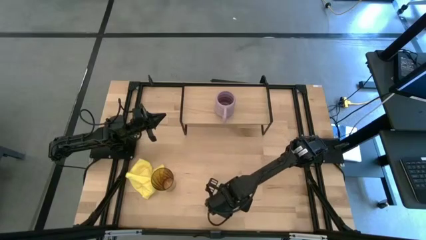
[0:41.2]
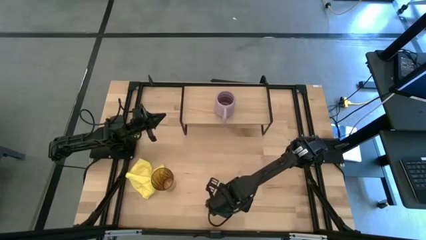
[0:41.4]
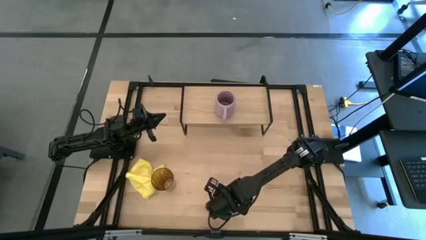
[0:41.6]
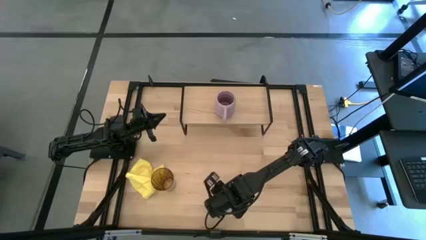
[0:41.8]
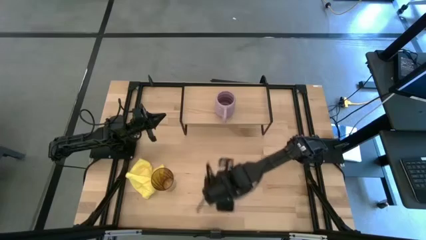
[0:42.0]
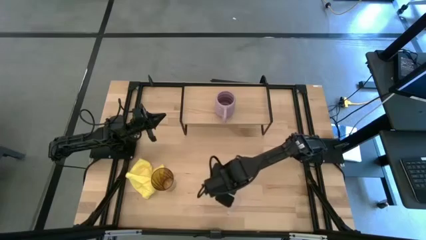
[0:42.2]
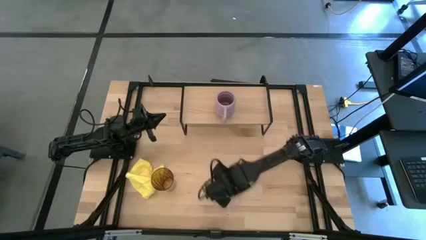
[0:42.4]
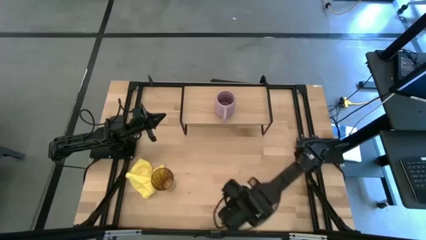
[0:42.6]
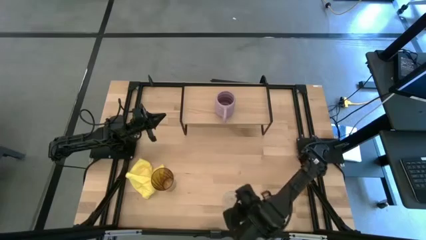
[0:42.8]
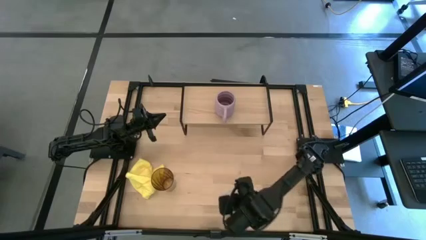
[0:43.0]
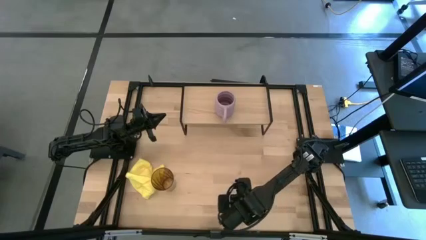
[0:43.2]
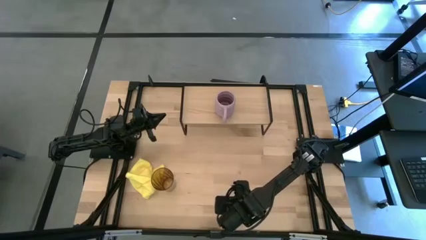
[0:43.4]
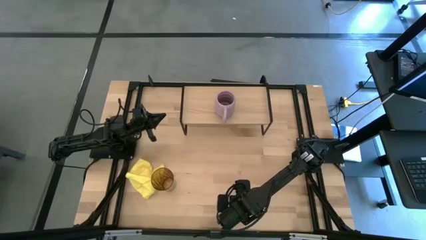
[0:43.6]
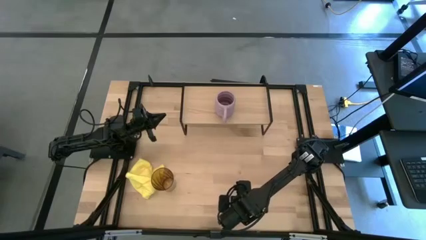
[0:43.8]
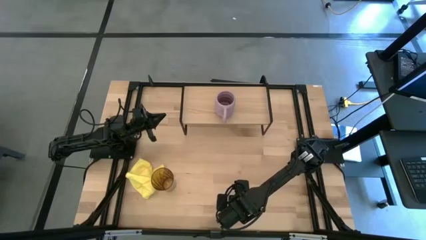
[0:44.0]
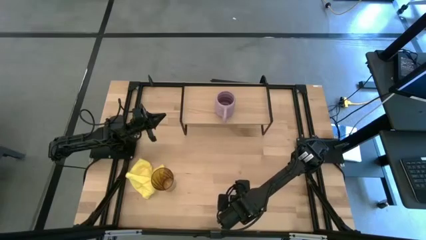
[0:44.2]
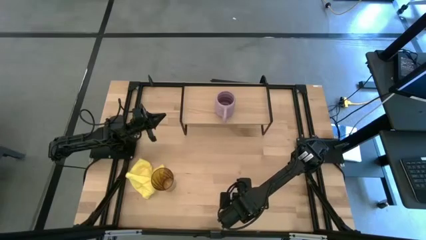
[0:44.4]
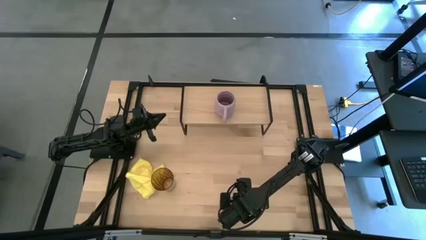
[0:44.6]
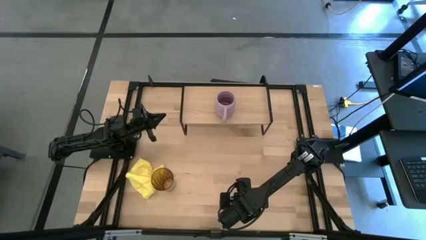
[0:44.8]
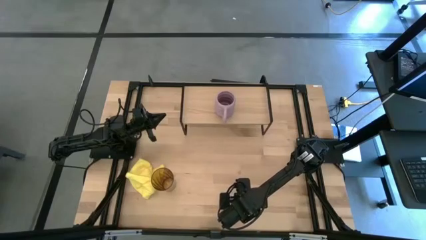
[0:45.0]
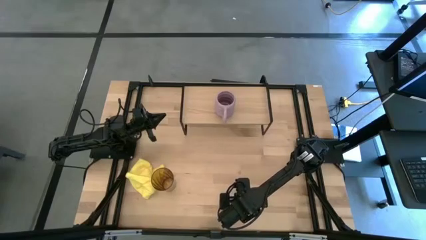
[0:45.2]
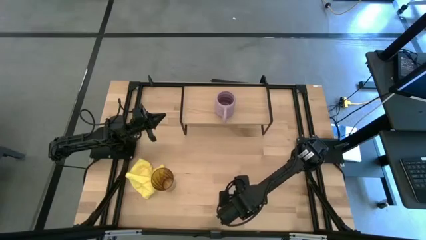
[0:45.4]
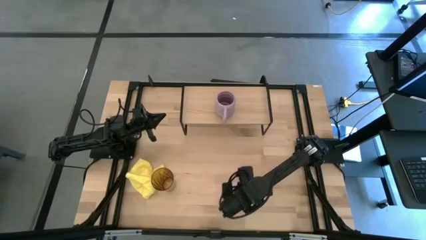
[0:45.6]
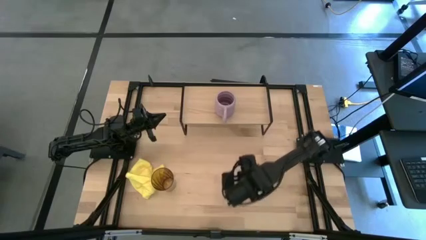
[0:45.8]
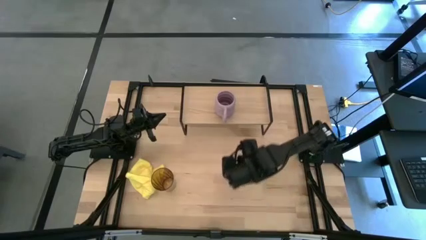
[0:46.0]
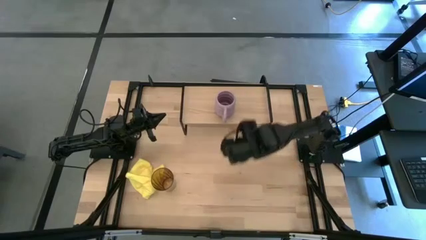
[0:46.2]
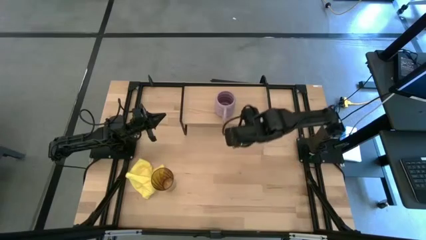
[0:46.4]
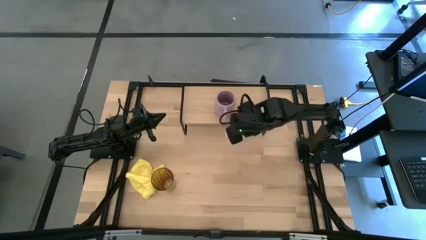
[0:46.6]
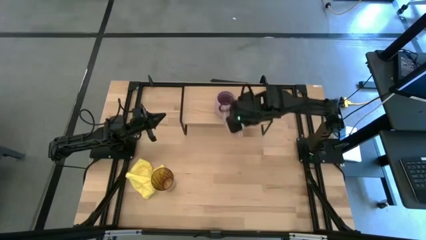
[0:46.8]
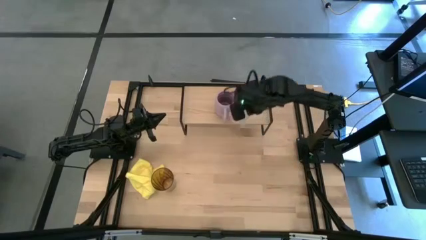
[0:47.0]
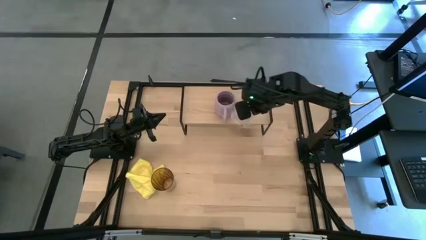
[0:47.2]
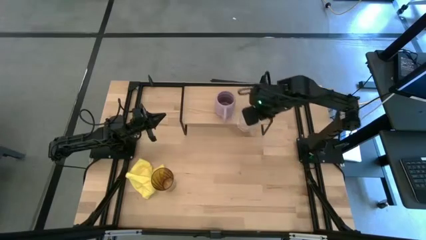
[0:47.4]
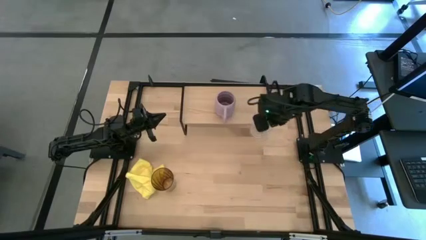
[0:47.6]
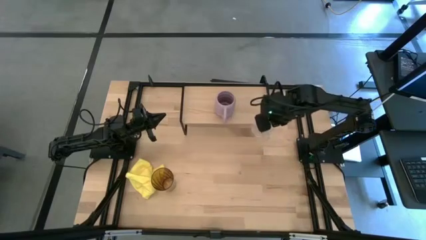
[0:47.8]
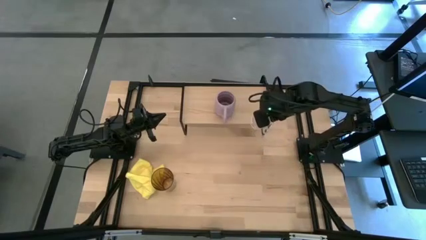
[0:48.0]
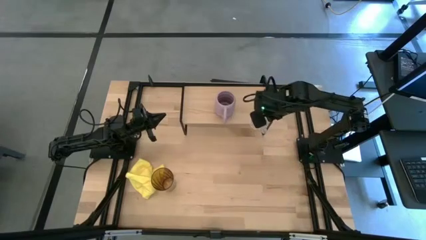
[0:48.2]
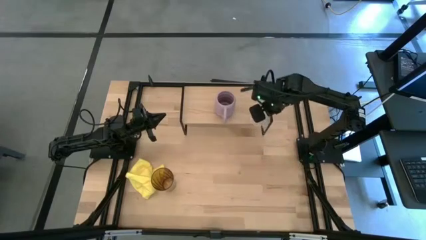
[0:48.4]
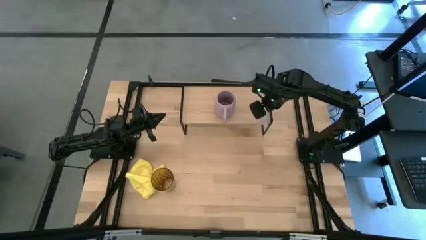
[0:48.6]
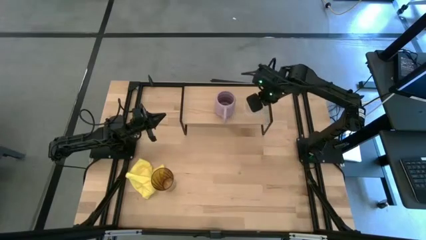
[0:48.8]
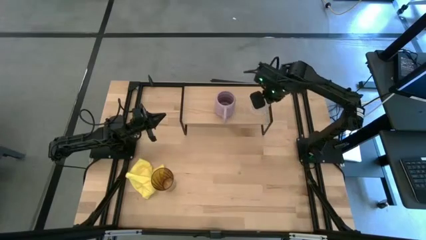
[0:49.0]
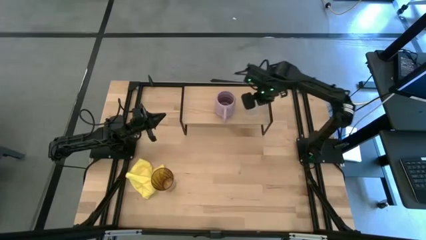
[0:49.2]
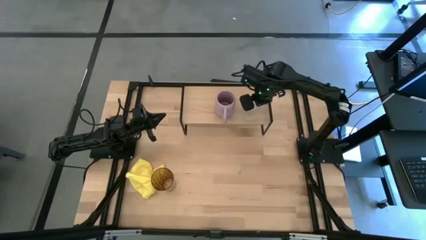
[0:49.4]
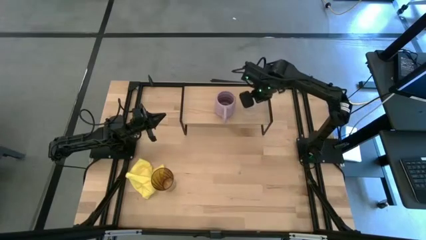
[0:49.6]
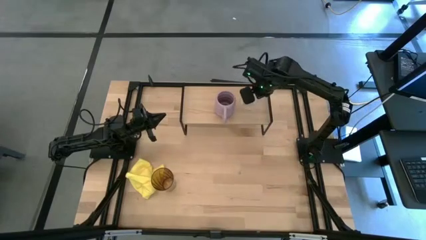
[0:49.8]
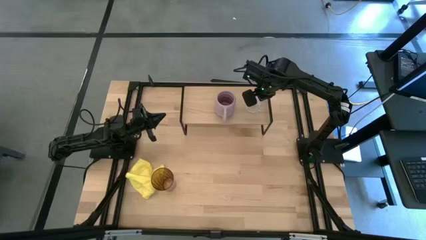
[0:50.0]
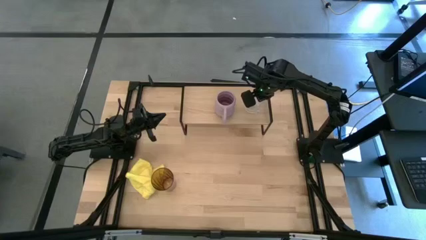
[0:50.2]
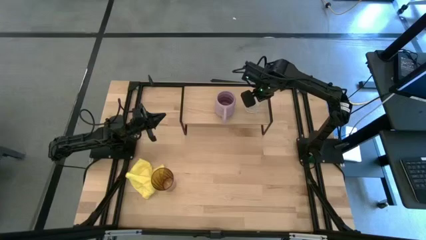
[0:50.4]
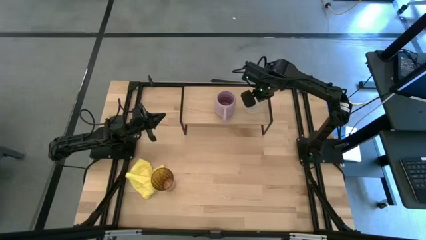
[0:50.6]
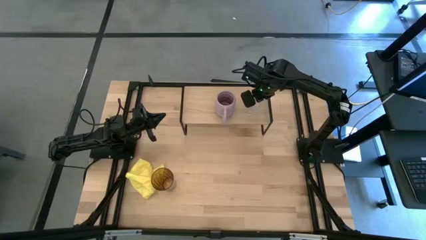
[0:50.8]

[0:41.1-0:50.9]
Task: Stack small to large cups/mugs on shelf
Put the transparent mug on the shelf

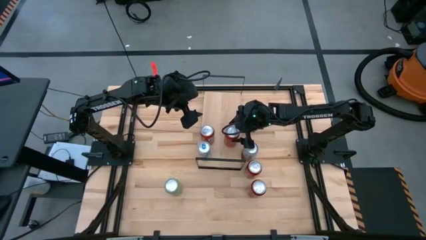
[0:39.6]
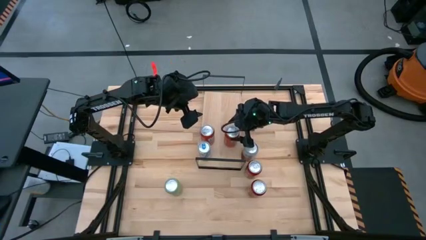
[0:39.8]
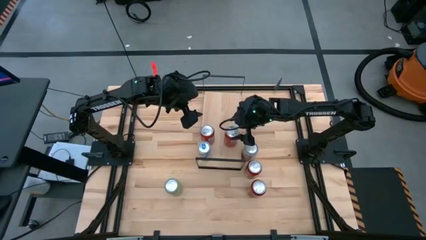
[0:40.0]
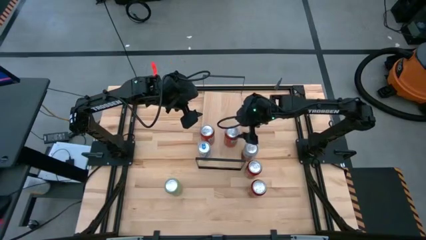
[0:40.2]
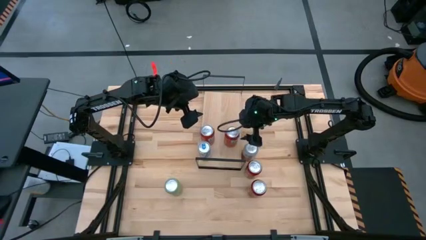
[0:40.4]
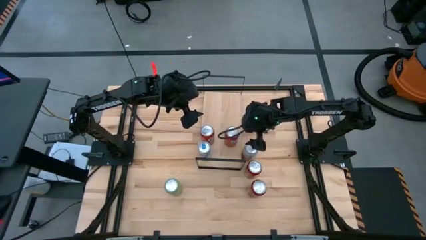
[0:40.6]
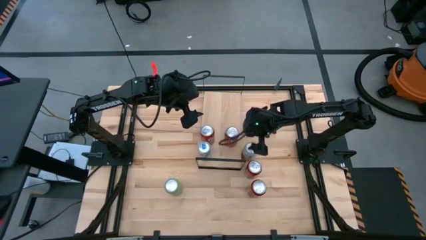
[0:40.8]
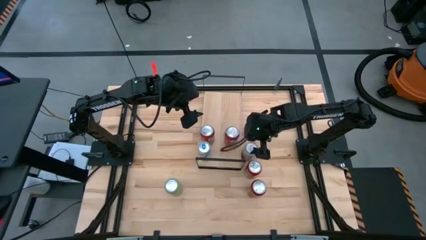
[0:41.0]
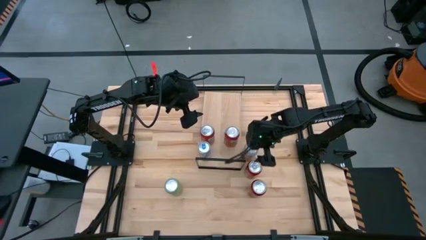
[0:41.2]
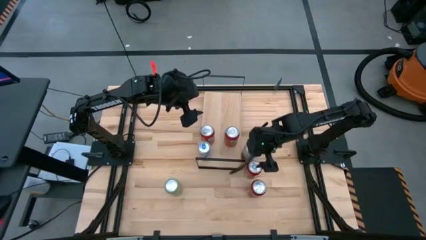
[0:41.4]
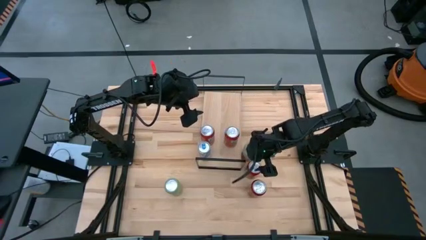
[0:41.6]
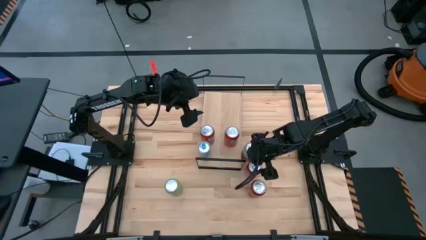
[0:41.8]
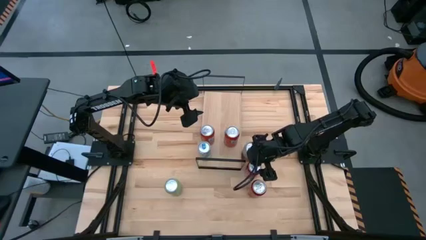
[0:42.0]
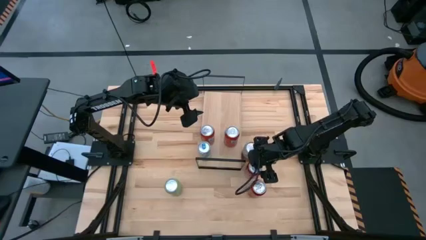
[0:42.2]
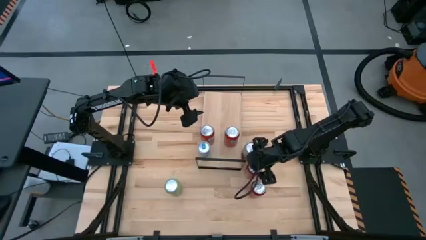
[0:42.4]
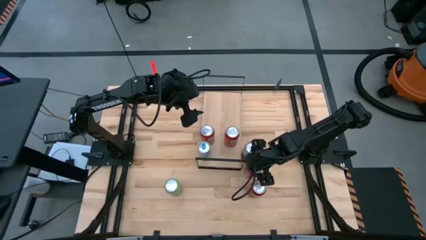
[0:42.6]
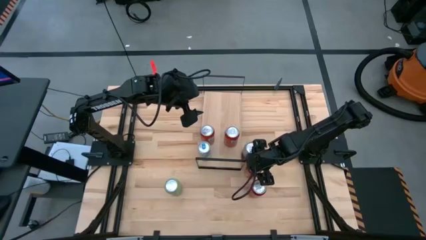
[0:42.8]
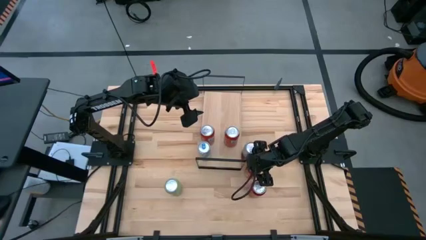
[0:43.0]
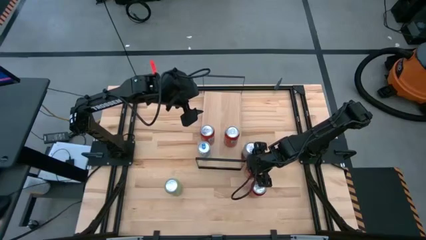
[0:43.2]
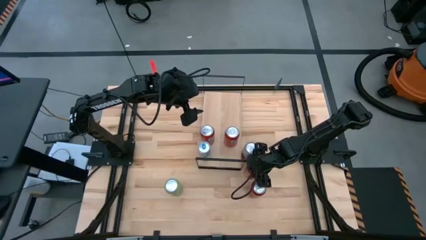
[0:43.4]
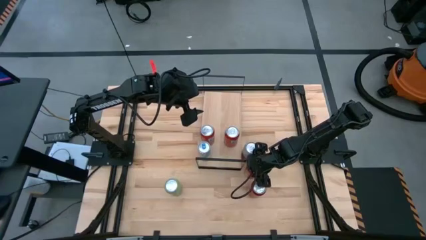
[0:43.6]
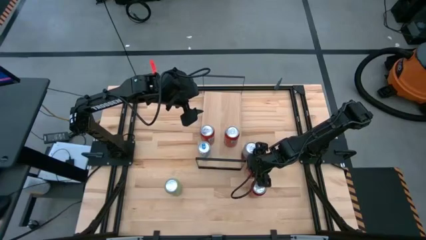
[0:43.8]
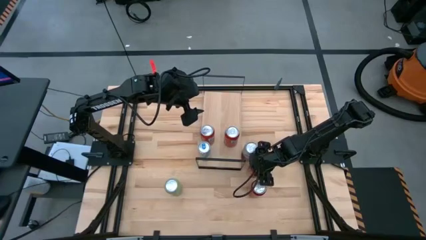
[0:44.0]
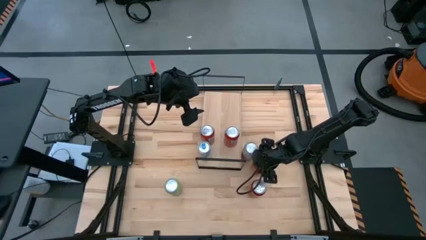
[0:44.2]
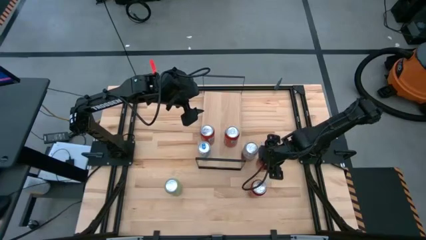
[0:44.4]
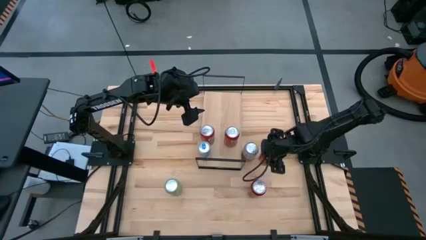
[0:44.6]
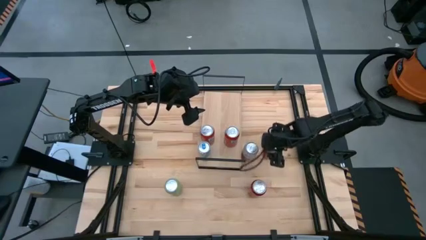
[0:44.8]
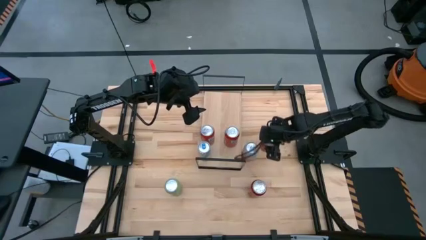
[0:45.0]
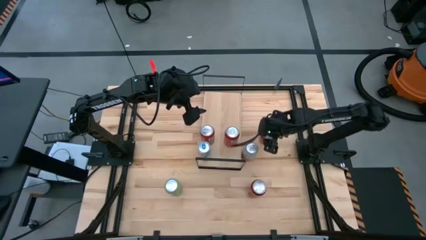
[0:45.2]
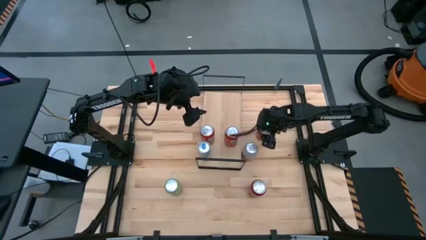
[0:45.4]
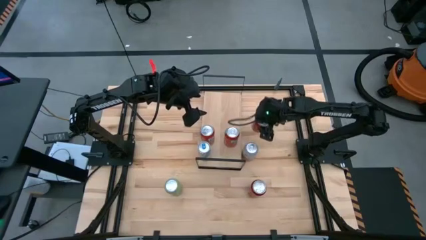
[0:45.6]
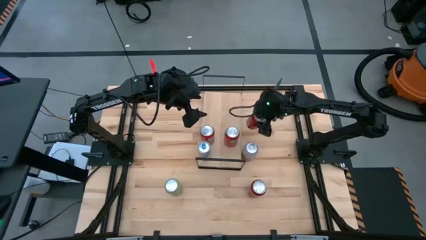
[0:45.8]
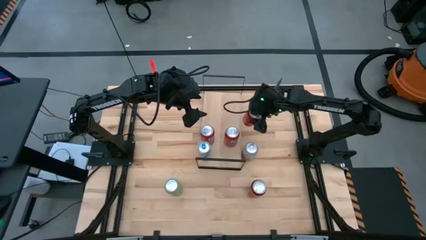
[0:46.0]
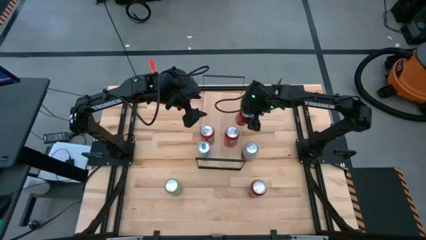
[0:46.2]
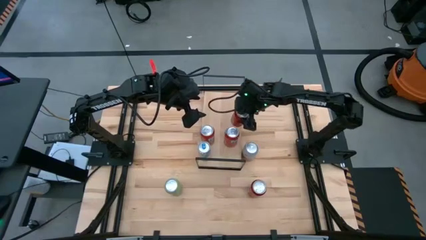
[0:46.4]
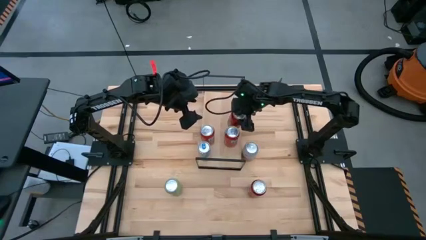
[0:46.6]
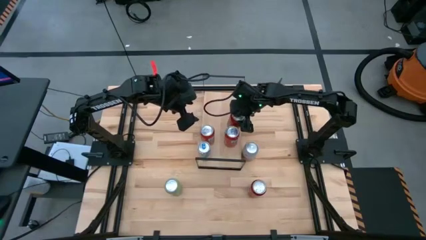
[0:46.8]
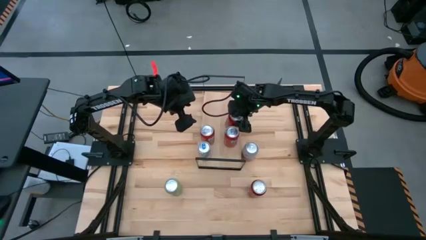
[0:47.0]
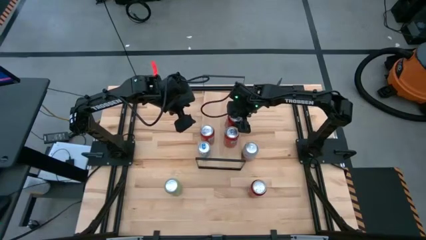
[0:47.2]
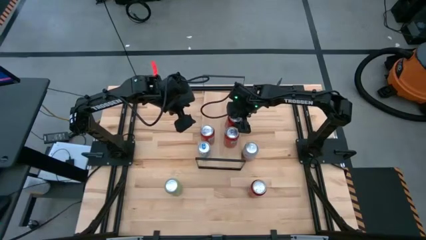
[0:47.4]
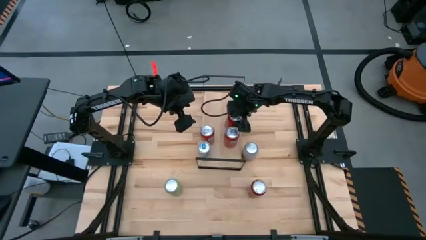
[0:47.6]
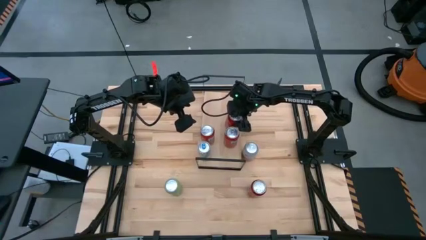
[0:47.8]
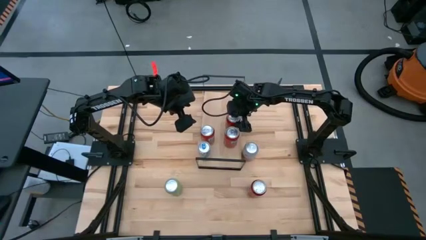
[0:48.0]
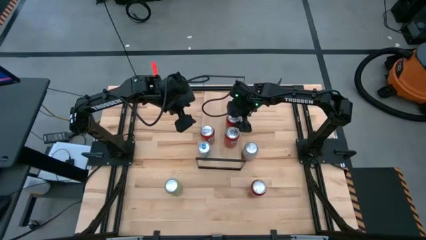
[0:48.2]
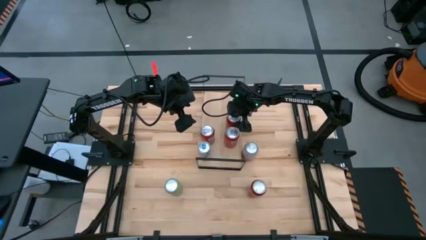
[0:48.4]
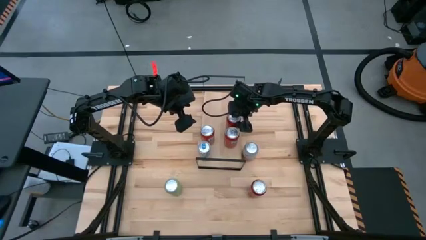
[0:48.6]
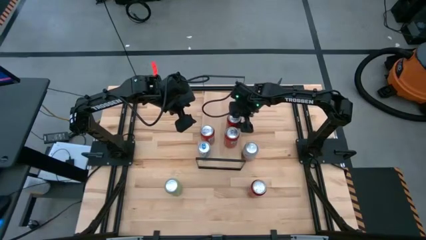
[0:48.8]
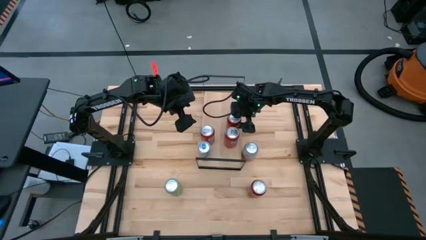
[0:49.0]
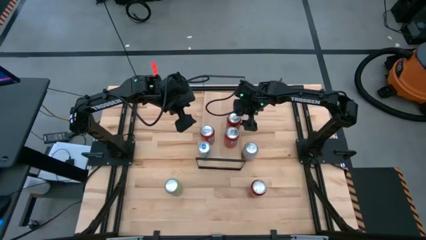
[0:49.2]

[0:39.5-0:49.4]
Task: Place canned beverage on shelf
Put the top red black soda can on the shelf
